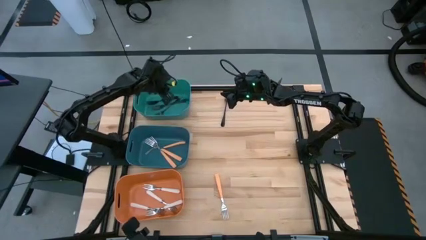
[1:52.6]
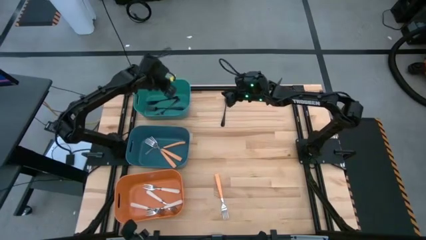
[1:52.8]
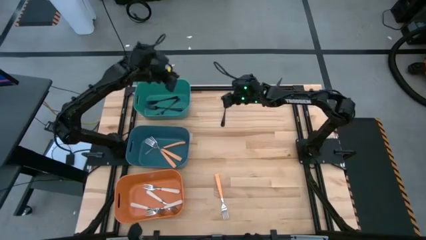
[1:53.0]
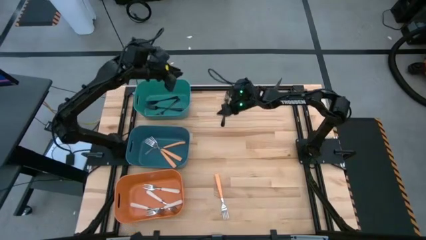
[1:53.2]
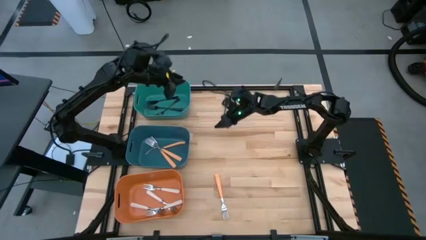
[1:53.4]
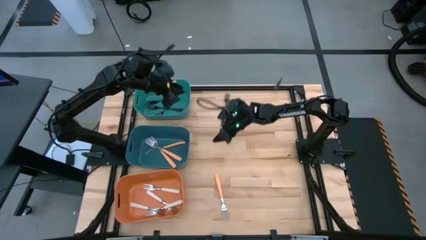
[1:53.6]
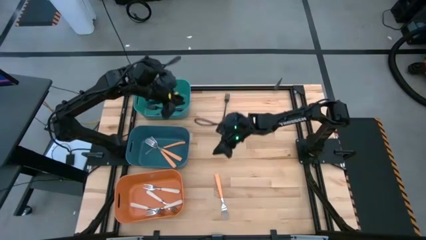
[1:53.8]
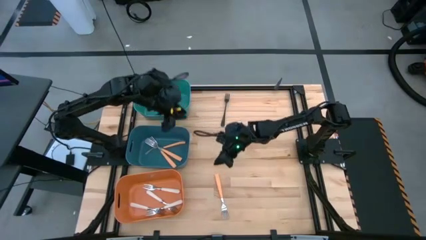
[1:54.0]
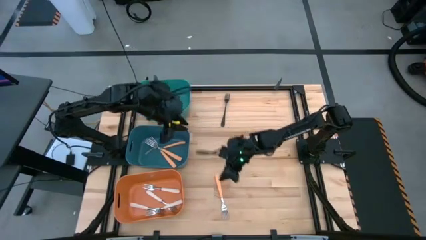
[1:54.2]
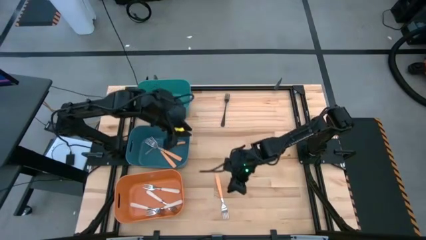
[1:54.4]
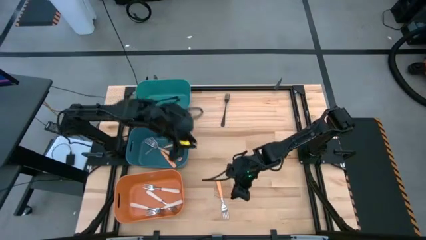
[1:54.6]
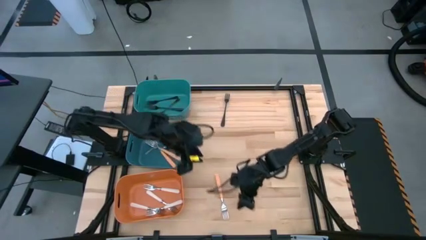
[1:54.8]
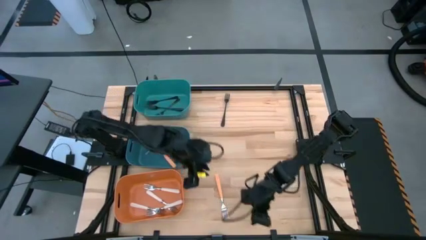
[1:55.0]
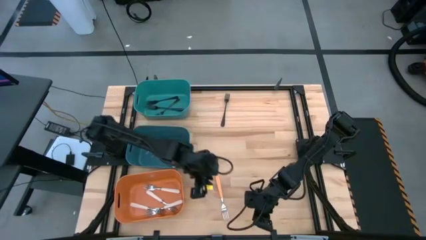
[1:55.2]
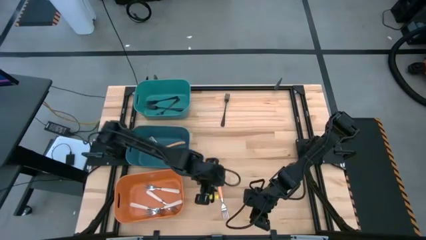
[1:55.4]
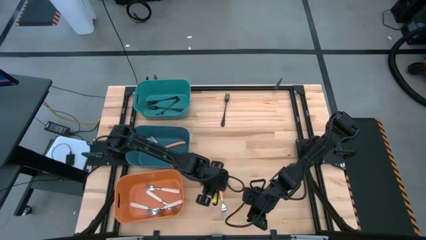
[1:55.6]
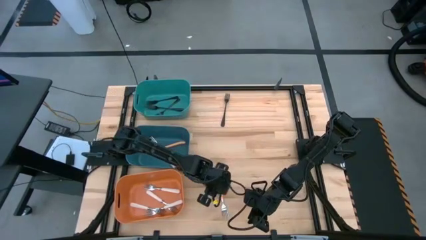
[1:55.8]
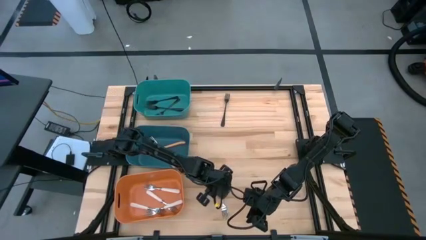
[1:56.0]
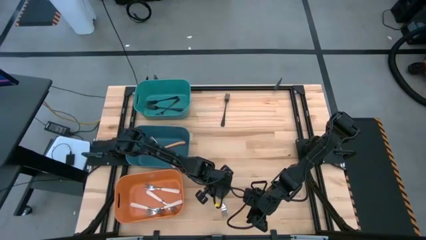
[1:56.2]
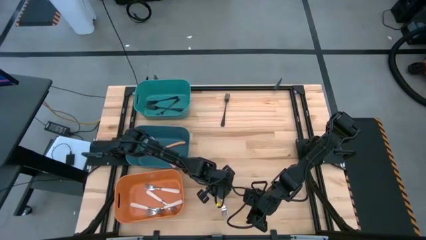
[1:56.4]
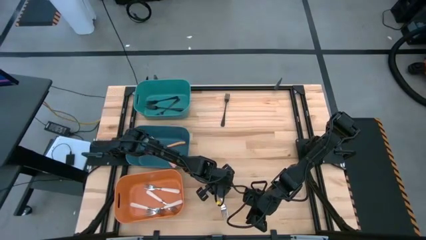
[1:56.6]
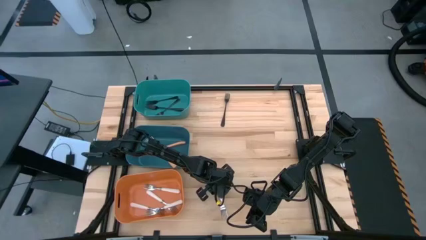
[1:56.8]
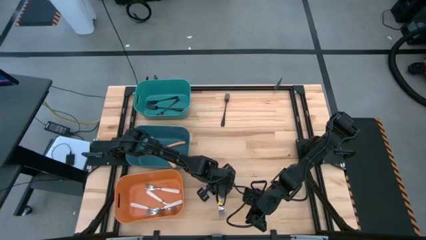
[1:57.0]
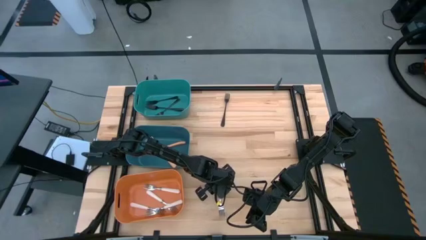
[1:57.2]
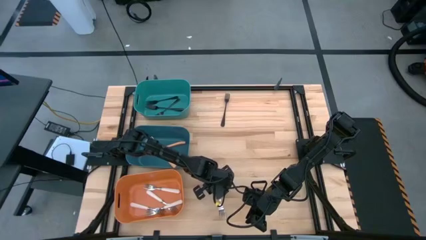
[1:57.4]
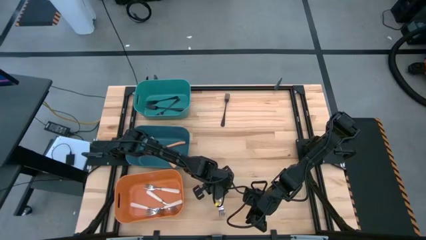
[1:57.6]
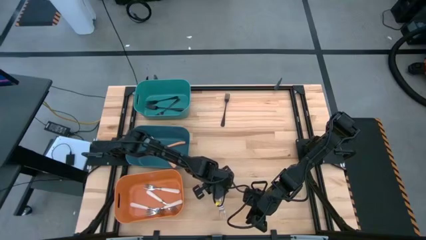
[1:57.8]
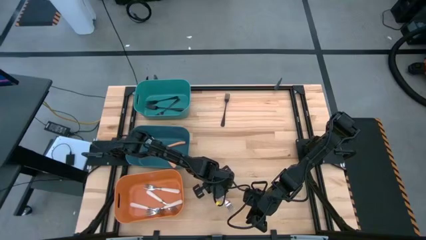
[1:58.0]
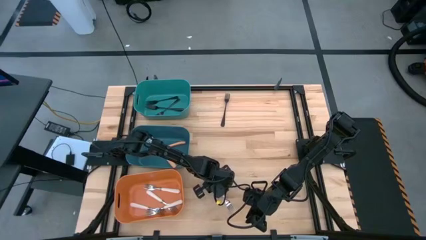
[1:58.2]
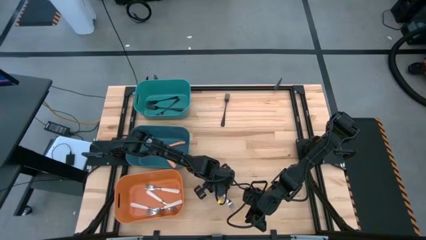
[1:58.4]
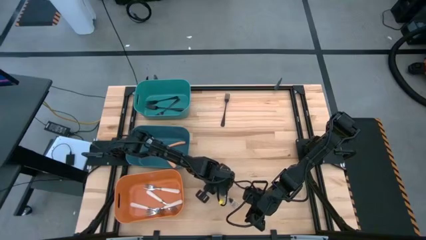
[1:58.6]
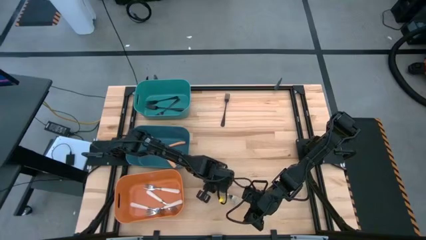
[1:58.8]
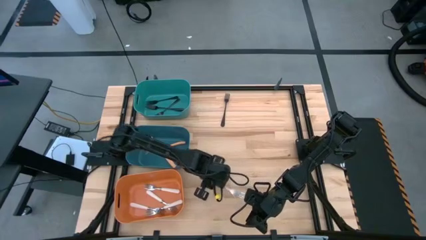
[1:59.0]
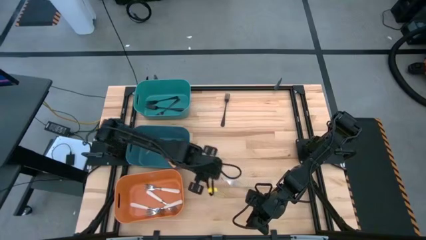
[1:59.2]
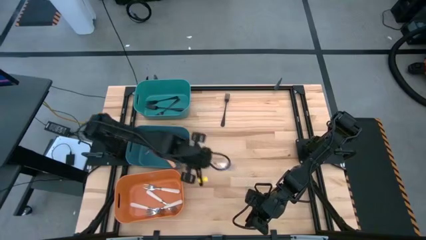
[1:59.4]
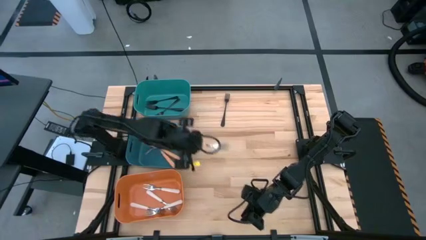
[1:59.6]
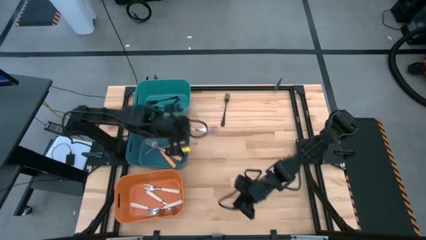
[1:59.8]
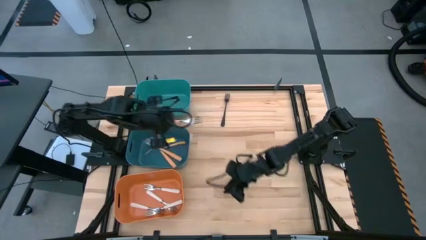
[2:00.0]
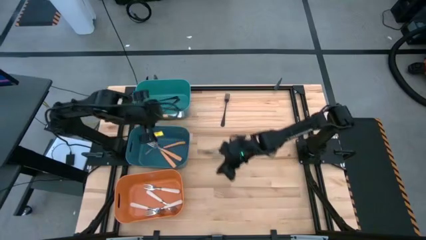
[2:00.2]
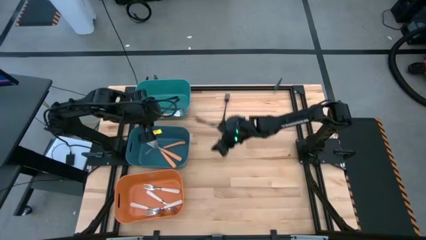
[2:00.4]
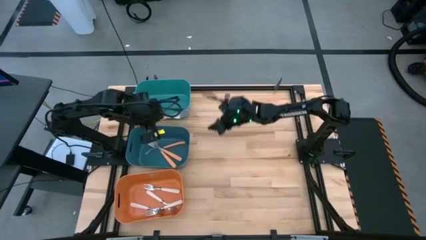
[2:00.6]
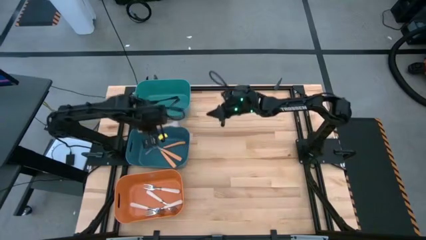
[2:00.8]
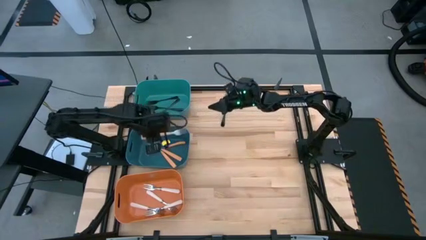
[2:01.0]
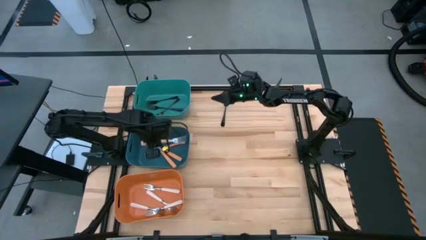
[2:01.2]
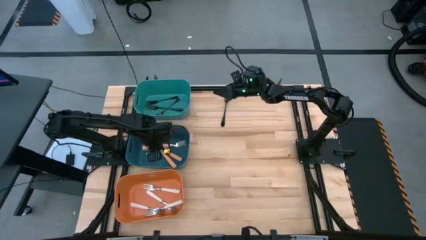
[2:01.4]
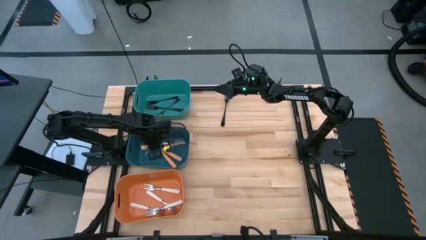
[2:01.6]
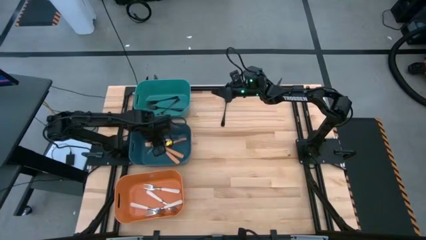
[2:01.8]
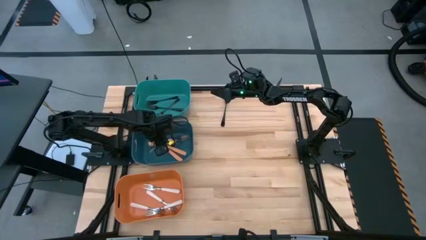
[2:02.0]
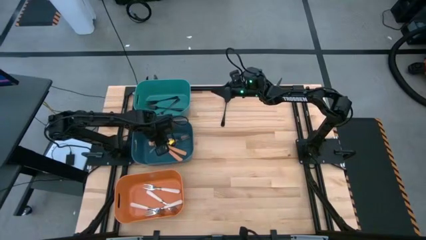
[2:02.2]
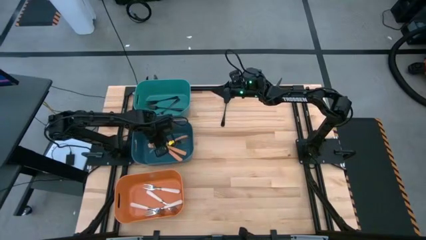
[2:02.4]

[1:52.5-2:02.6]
Task: Sort silverware by color (type)
Put the orange fork into the blue bin

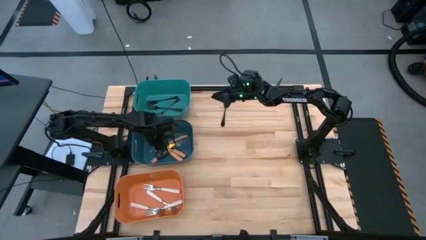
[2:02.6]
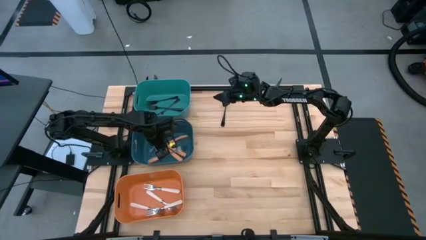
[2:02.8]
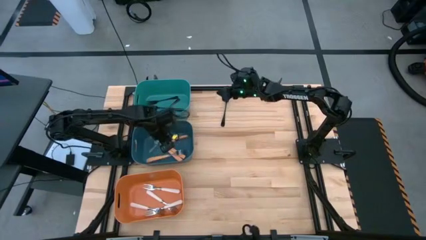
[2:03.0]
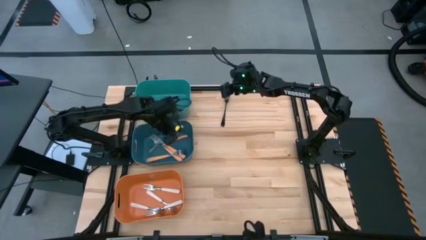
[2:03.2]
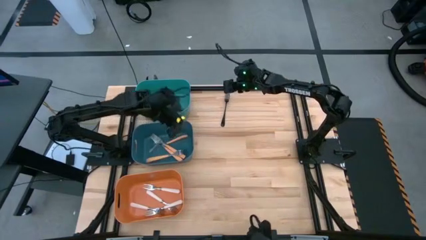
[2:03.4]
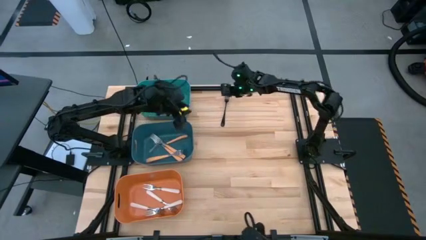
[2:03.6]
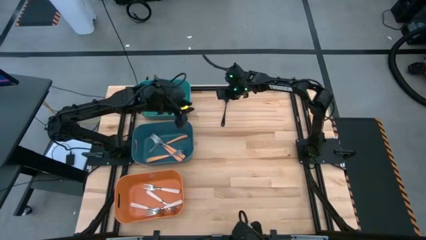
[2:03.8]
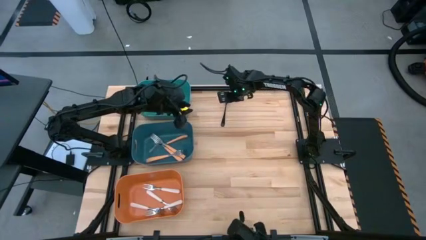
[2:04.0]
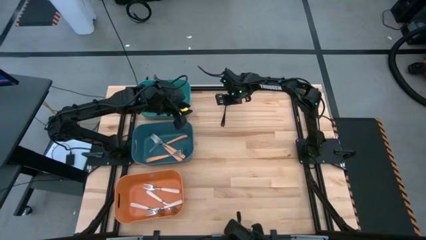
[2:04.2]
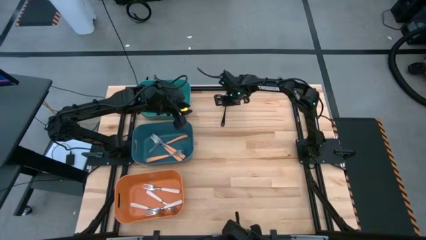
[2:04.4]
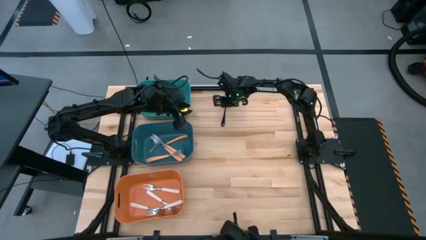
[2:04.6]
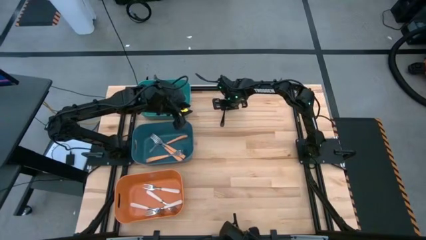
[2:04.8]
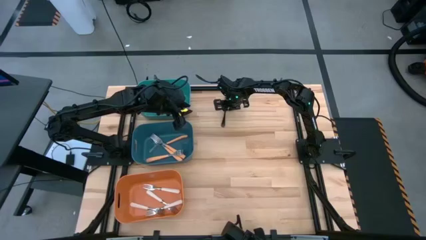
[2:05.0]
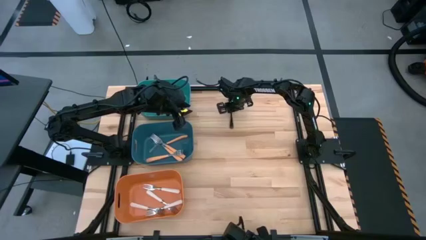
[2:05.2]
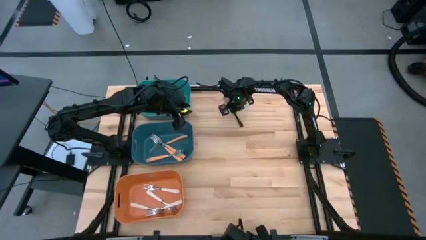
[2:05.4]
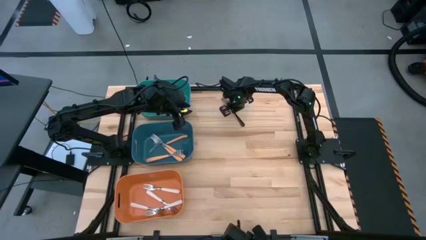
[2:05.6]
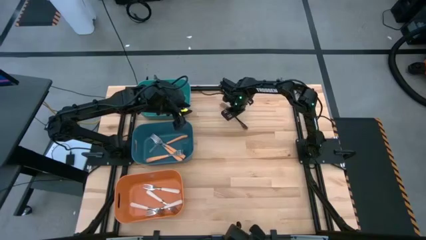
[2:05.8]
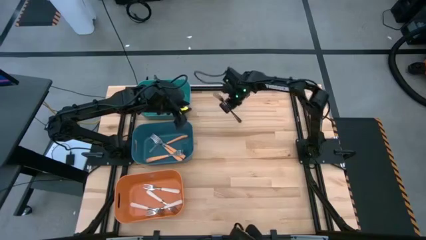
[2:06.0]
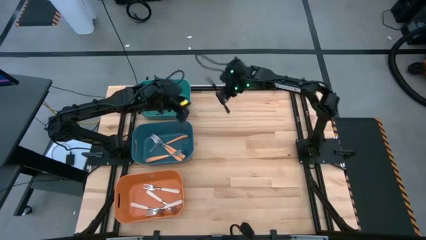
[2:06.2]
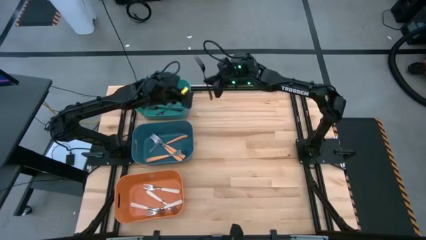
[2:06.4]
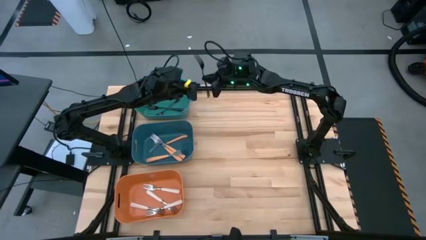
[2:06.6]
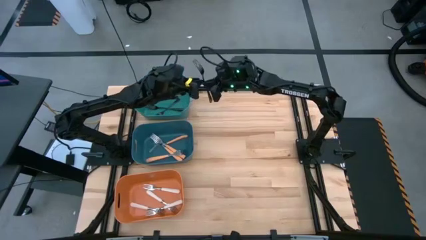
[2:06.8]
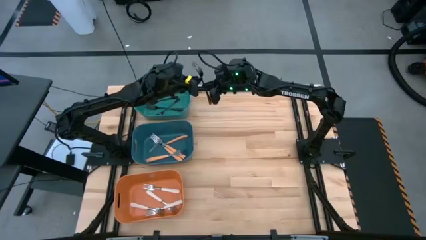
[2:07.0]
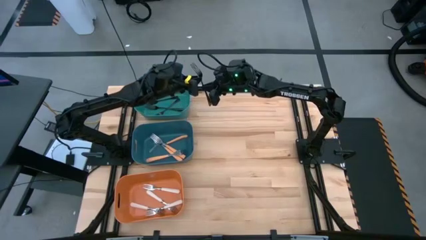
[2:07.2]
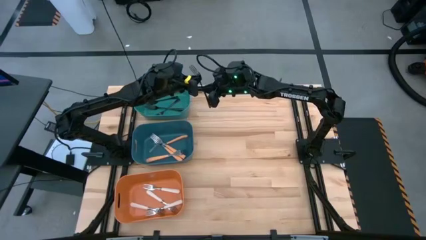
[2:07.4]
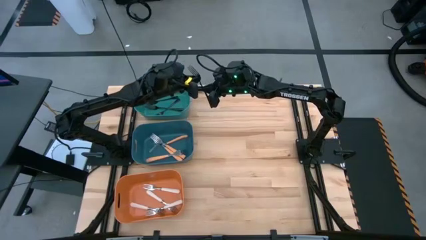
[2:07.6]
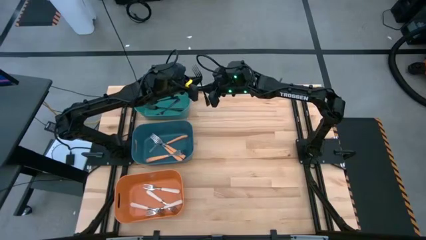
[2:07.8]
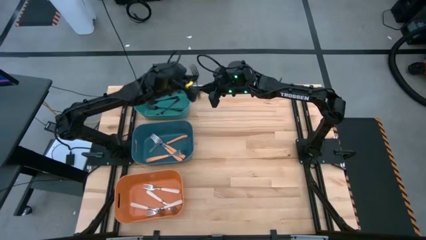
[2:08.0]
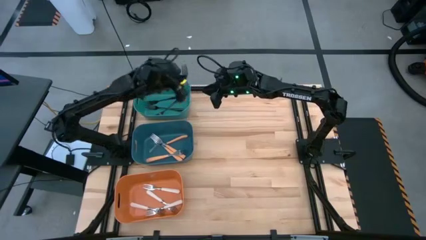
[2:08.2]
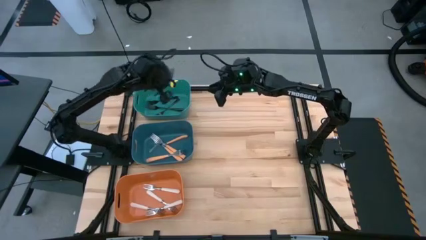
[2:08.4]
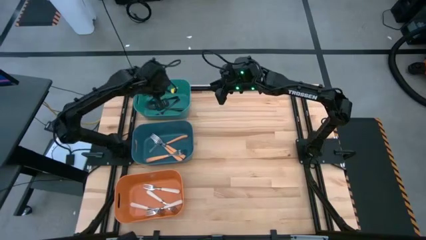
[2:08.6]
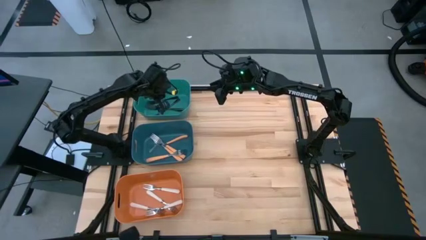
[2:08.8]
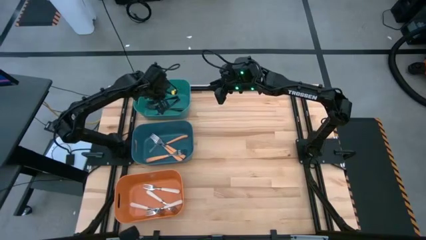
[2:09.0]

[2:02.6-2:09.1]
Put the black fork into the green bin
